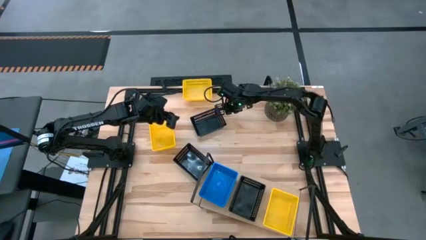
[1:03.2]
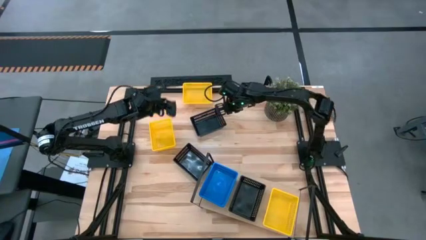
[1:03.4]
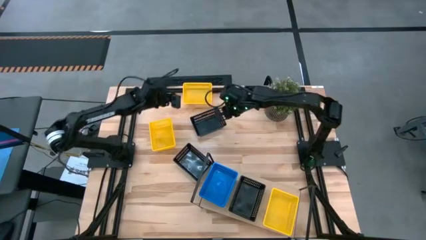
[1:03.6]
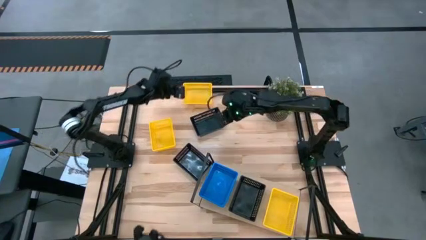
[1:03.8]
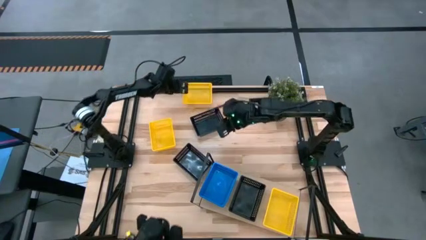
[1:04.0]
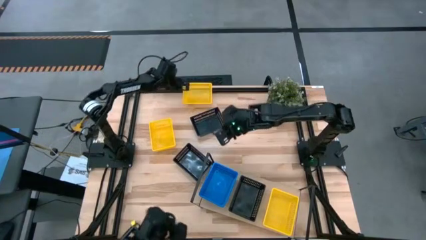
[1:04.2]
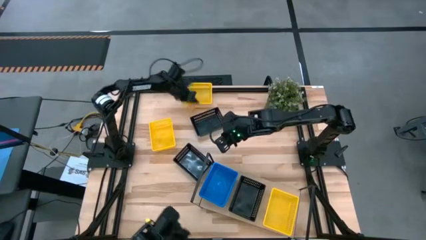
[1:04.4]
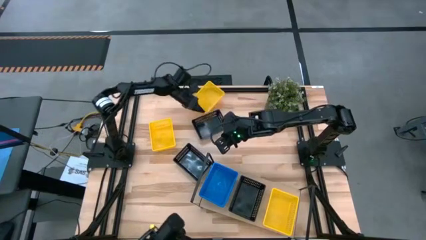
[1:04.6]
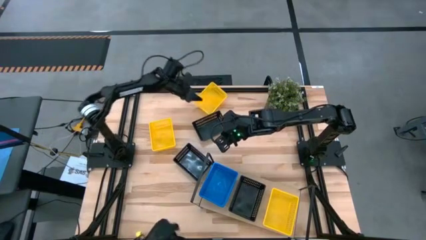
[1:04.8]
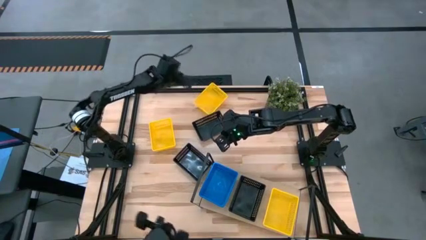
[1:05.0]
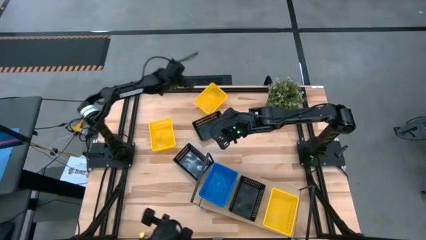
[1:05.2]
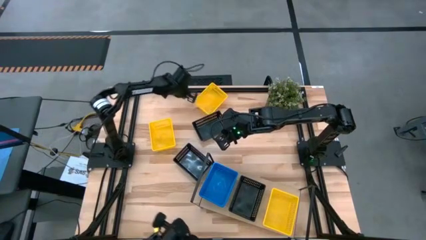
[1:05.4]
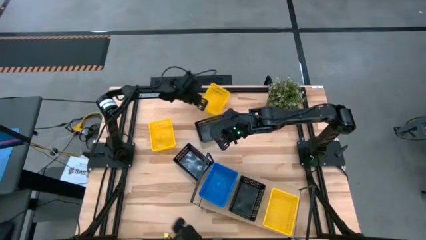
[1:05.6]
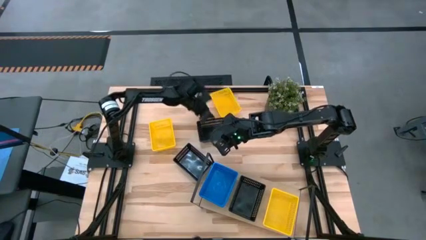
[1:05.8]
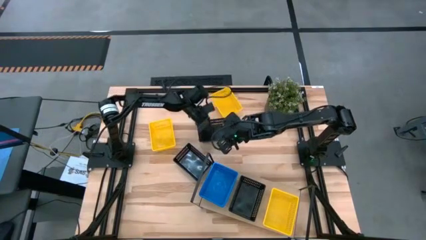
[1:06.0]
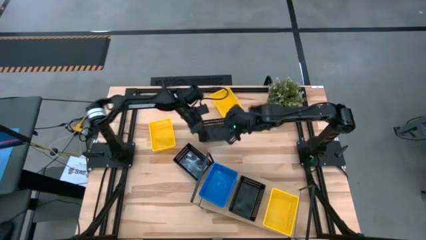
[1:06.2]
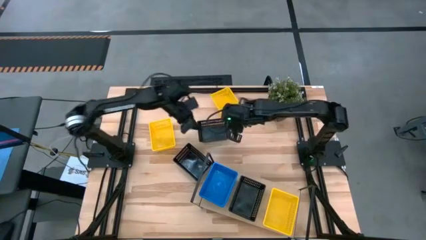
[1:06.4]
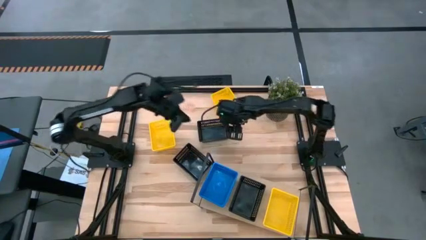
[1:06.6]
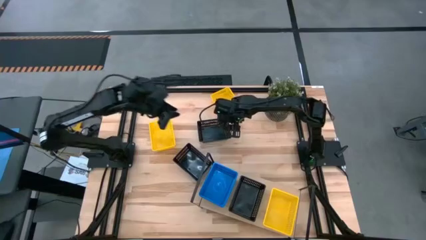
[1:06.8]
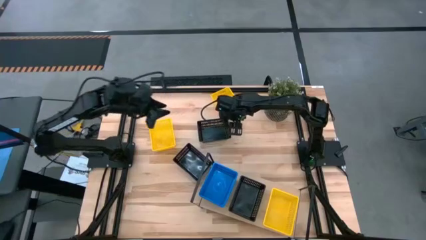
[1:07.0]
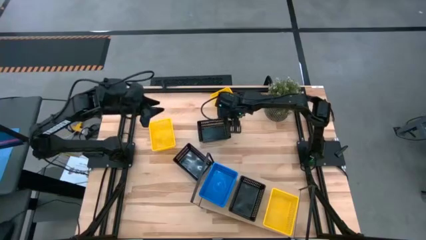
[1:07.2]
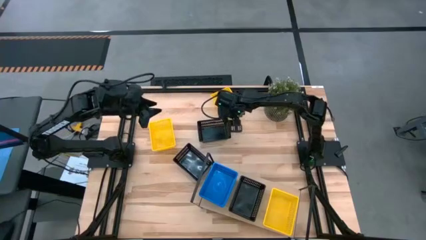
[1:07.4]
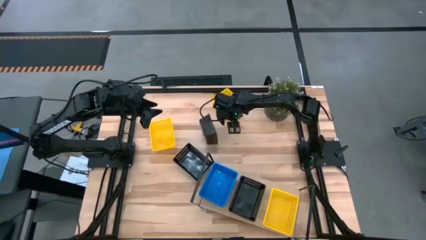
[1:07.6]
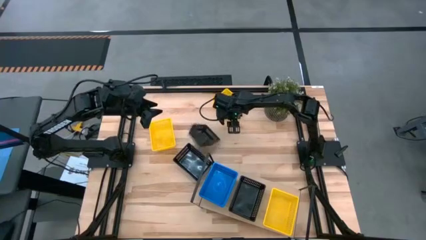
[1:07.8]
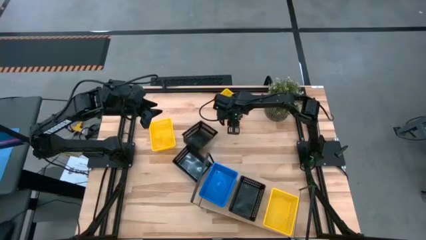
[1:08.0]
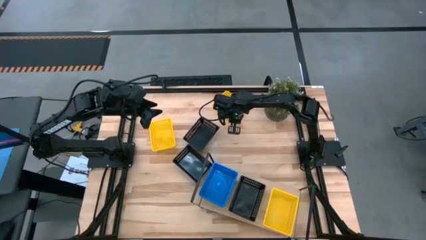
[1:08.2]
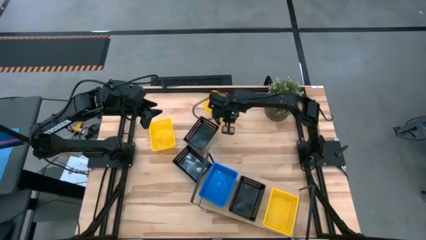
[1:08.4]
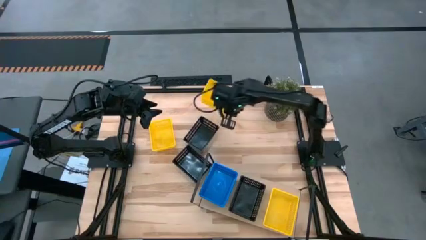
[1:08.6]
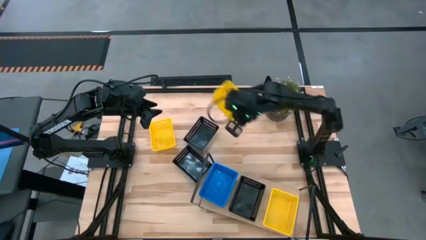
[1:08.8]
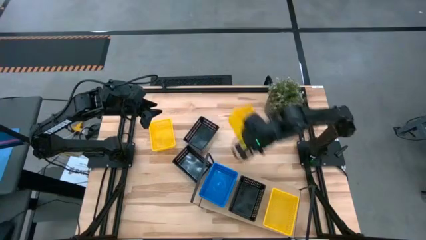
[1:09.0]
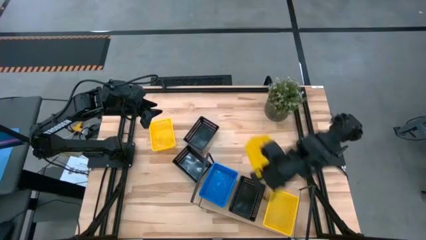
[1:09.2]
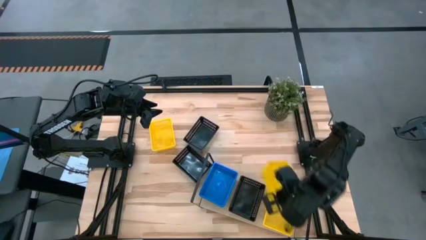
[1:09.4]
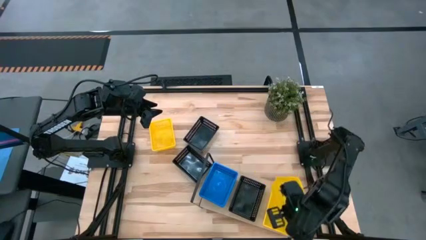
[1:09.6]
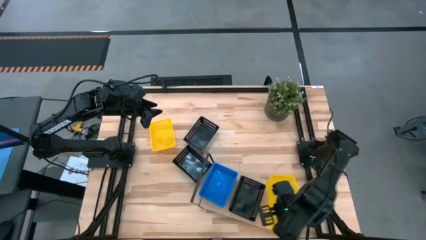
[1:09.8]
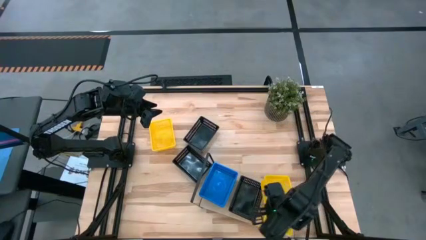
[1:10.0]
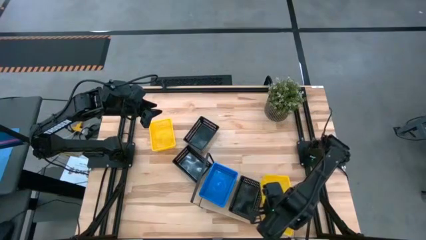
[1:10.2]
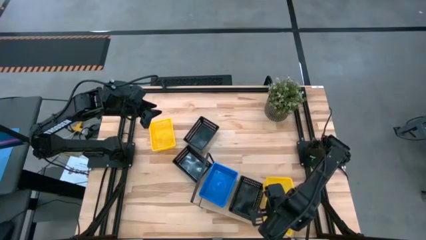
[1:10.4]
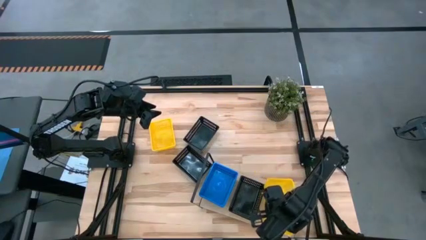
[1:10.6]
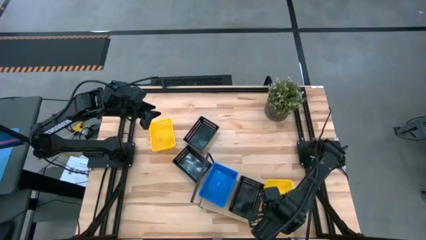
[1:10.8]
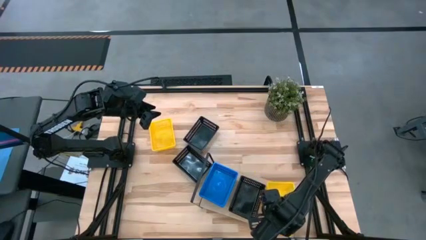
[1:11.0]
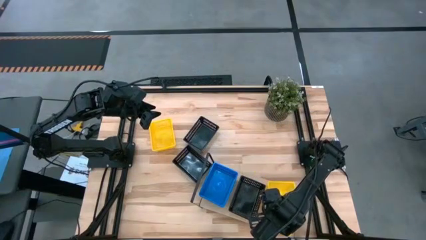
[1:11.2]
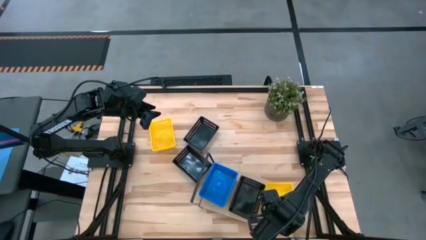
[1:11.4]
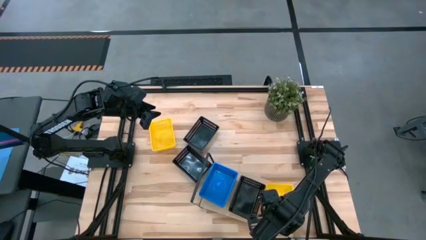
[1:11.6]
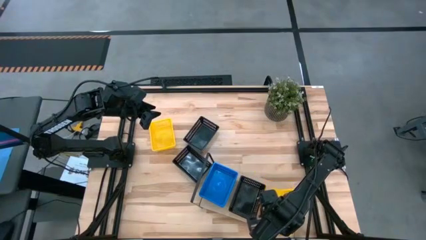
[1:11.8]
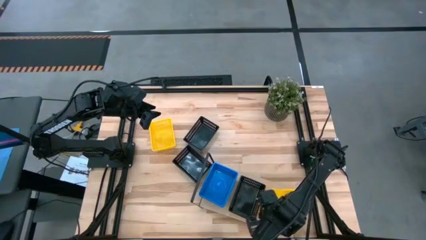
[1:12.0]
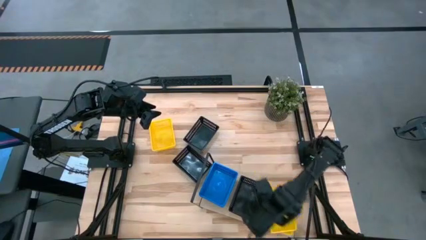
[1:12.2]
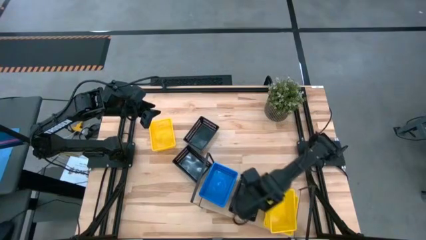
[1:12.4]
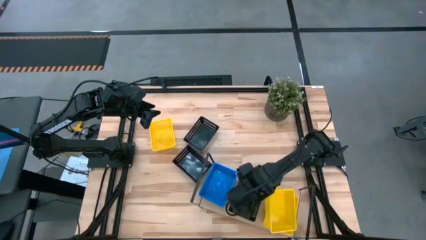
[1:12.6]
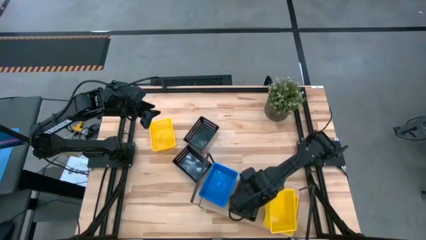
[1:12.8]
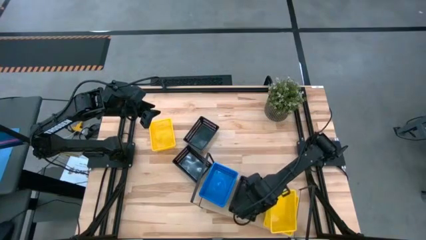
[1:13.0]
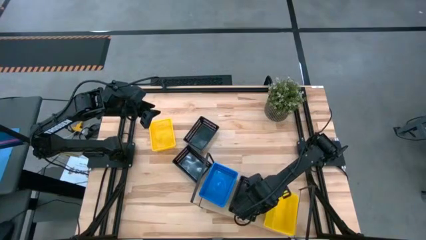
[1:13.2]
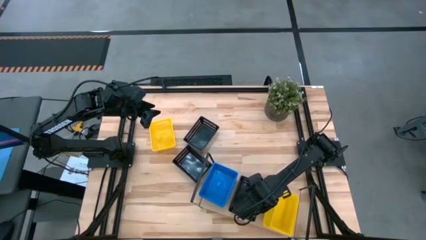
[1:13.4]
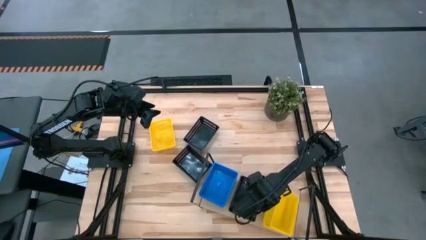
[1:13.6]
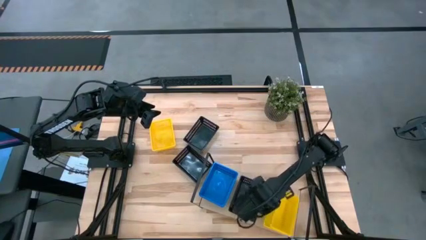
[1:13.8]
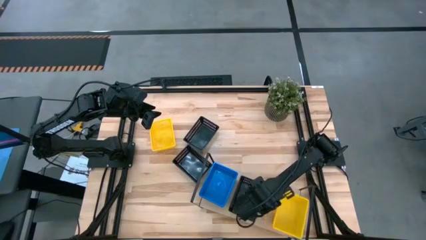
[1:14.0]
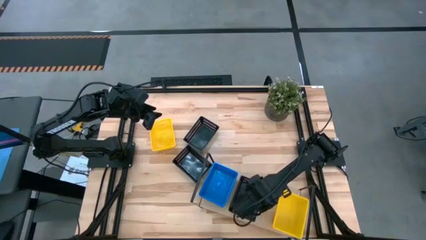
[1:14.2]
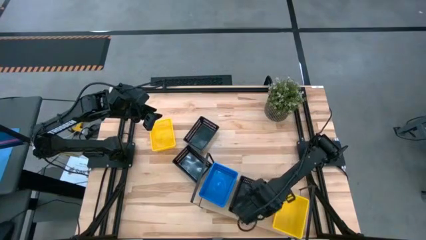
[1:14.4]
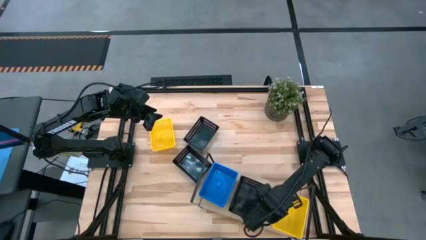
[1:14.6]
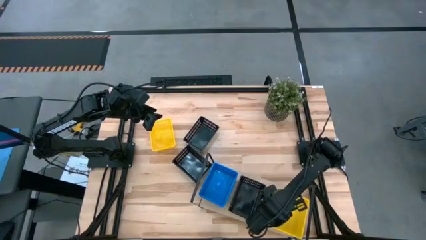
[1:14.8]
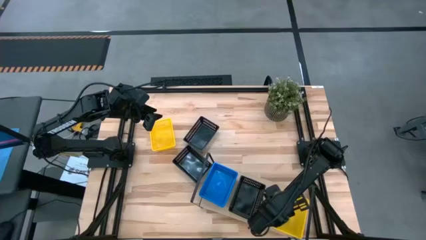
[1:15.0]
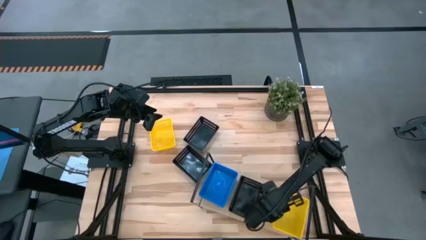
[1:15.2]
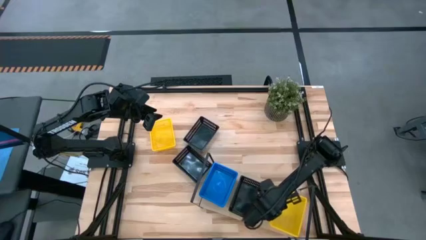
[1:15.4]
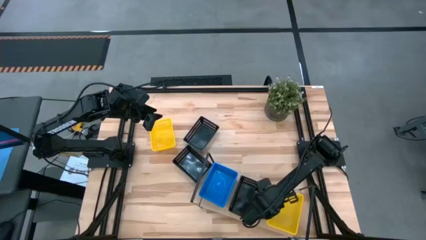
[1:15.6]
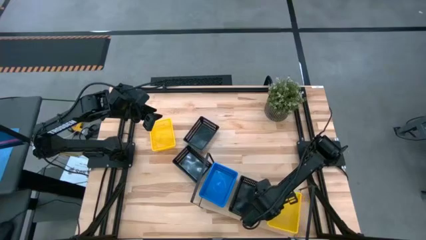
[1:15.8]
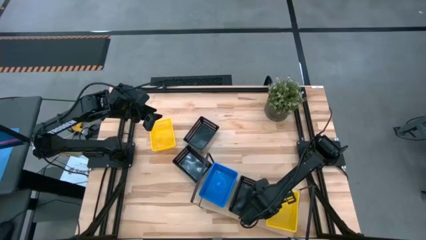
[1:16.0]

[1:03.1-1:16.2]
Task: Stack baskets on shelf by color
Stack the top yellow bin on top of the yellow bin on the shelf

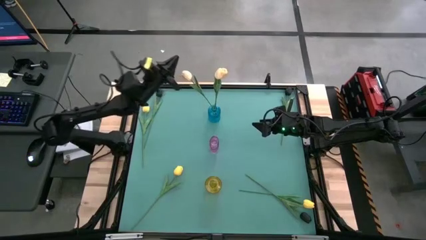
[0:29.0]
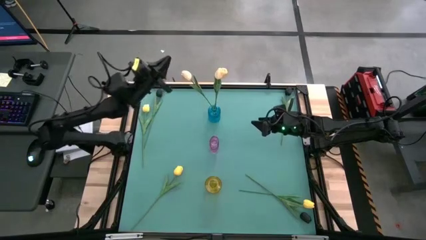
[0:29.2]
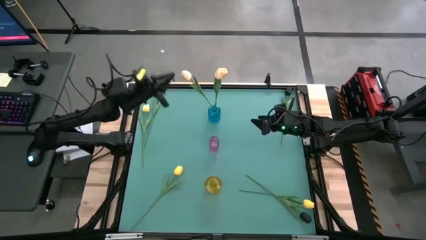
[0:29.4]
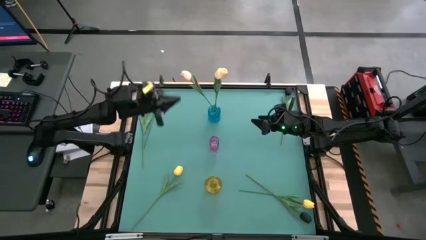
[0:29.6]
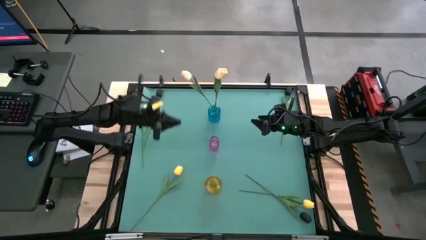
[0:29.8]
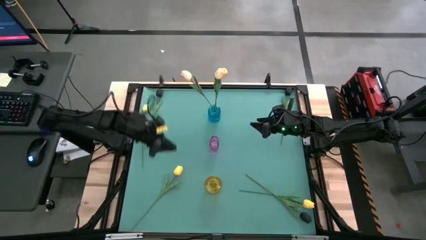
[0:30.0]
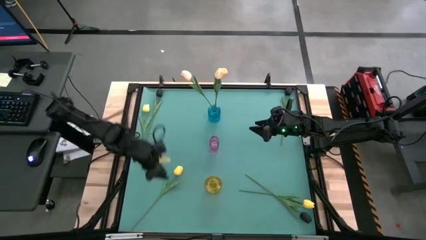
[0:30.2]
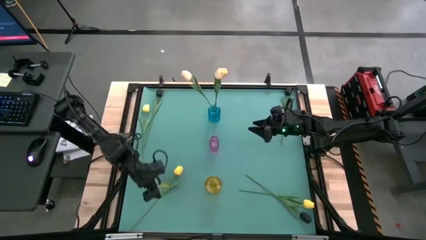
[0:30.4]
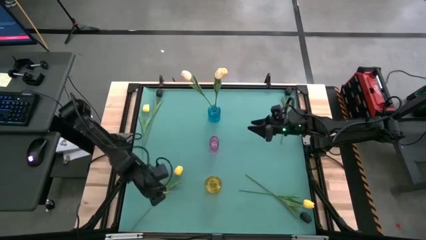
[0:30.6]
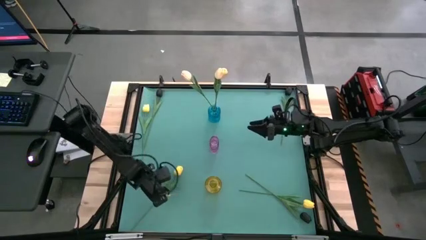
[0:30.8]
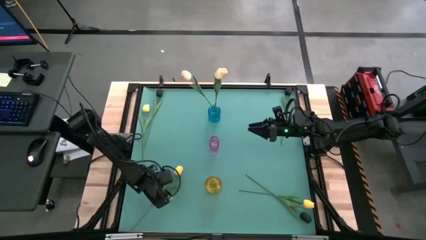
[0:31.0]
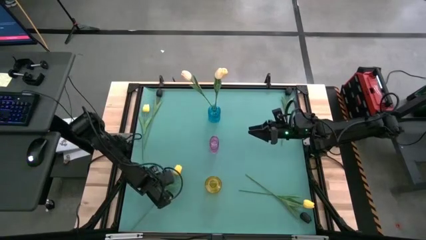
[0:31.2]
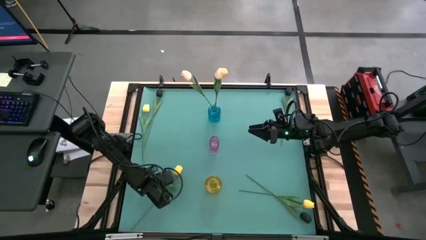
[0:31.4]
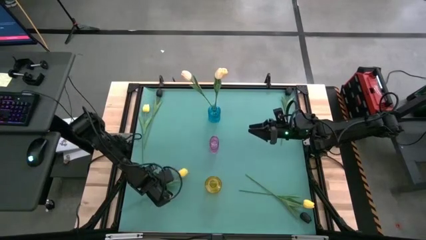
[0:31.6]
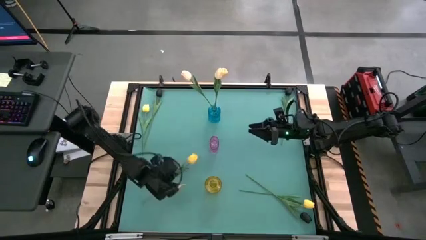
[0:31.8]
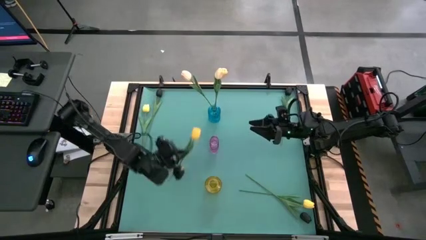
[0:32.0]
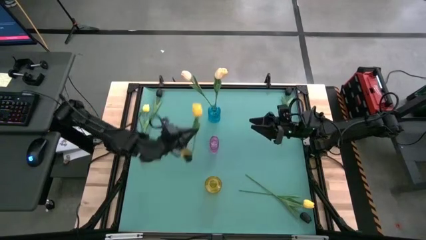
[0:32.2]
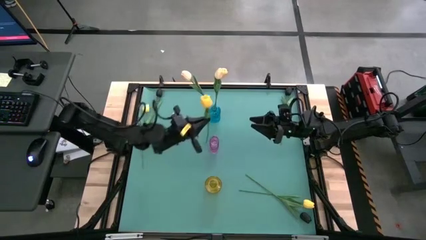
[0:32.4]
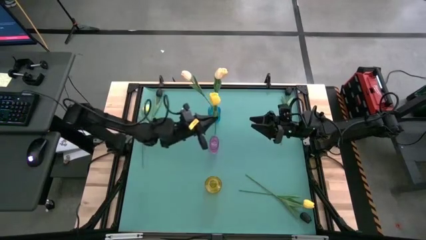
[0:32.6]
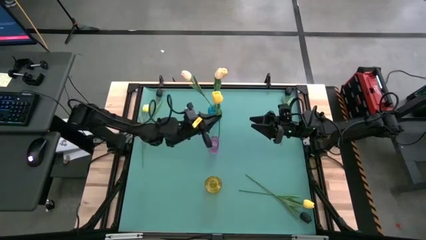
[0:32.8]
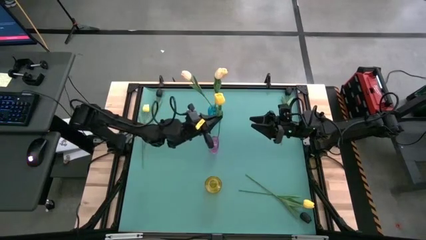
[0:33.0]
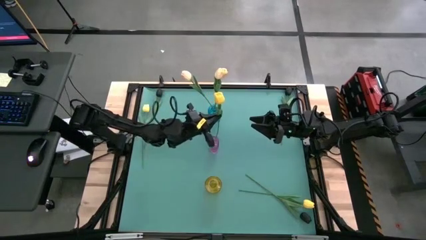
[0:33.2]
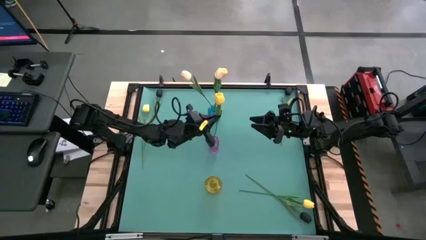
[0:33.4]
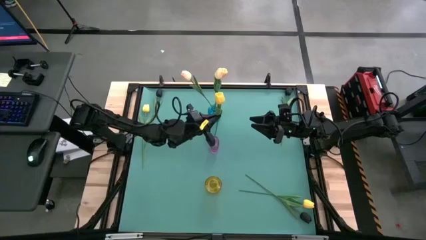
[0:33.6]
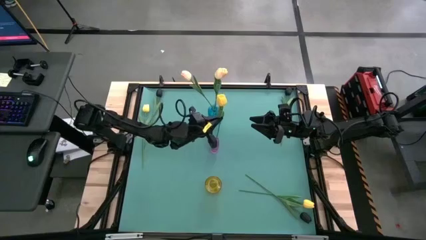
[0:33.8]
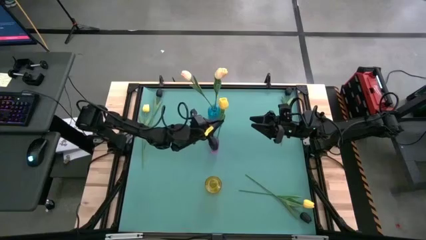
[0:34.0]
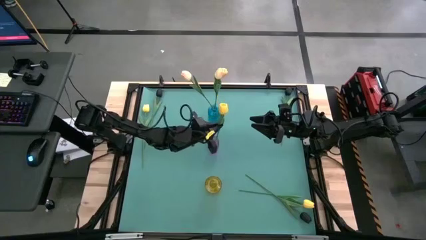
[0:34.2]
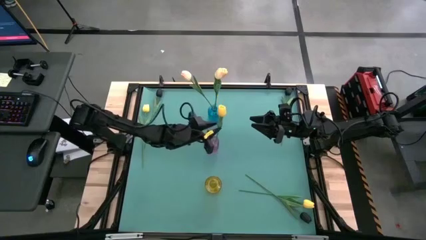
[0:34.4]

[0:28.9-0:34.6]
Task: Sort flowers into vase by color
Put the bottom left yellow flower into the purple vase
